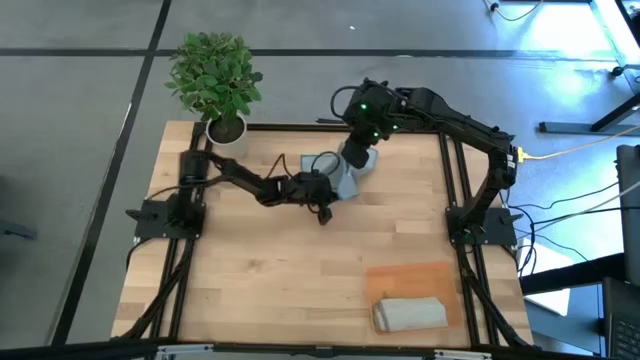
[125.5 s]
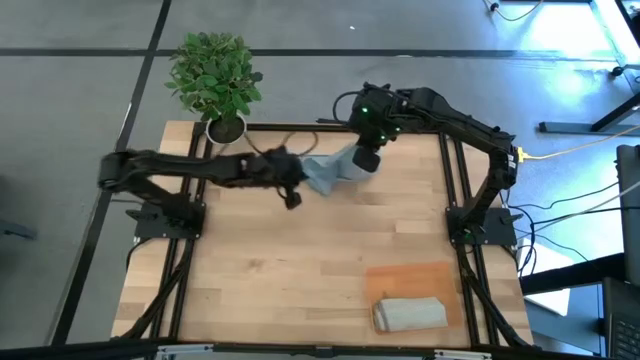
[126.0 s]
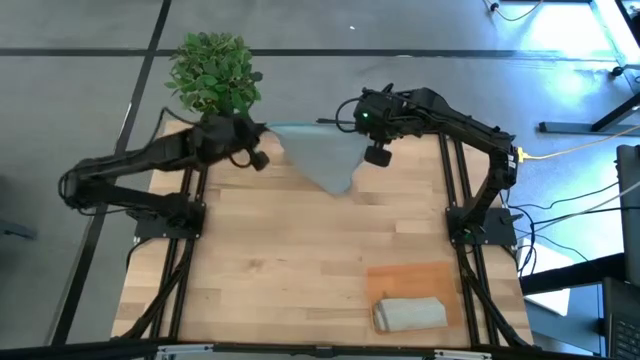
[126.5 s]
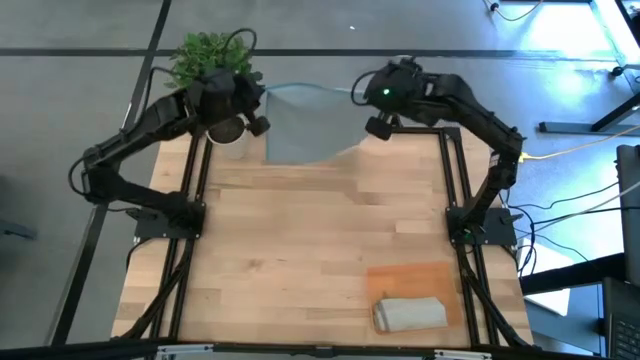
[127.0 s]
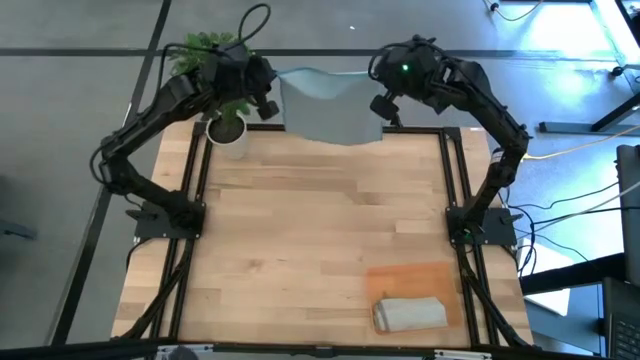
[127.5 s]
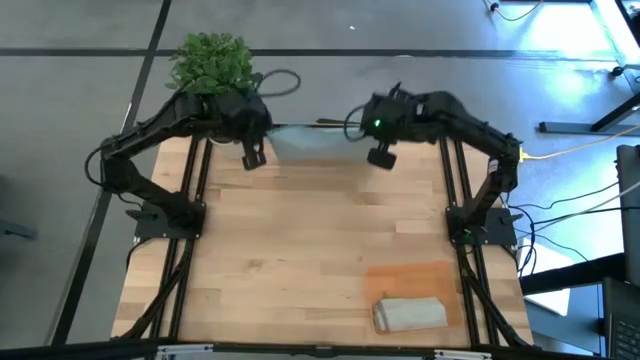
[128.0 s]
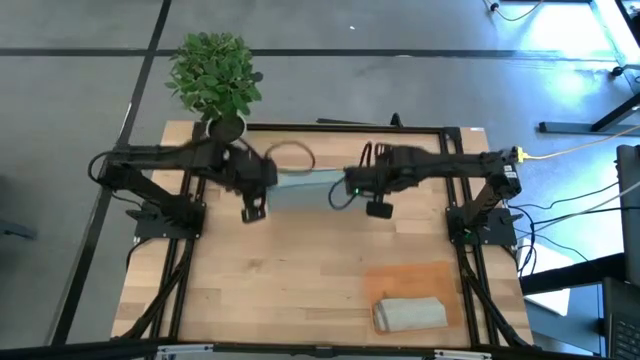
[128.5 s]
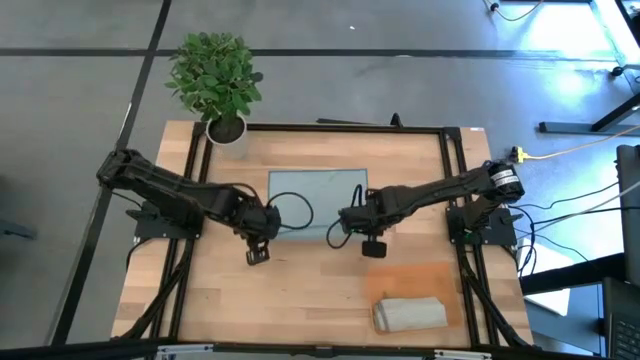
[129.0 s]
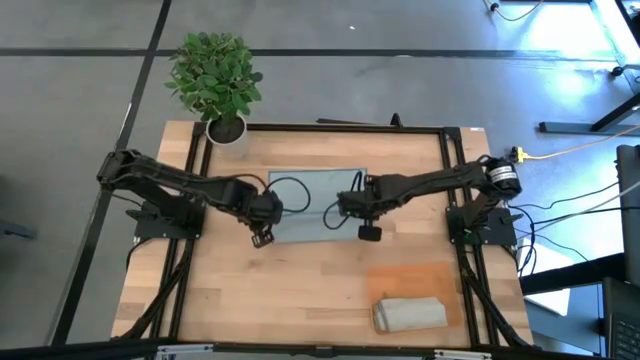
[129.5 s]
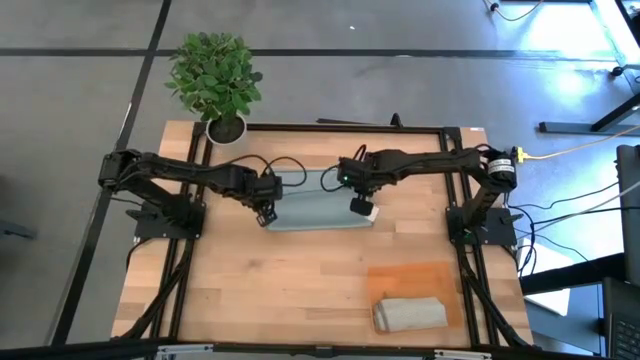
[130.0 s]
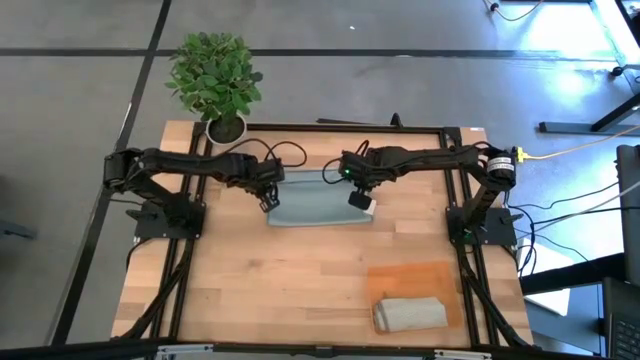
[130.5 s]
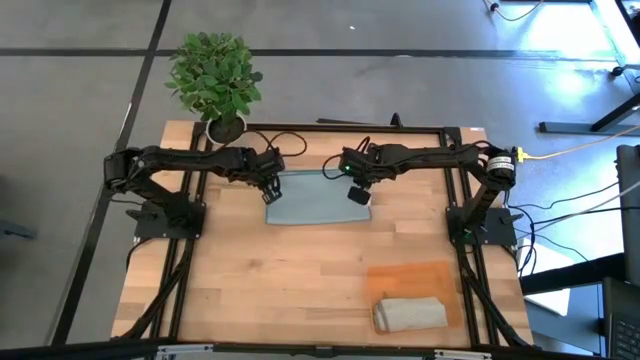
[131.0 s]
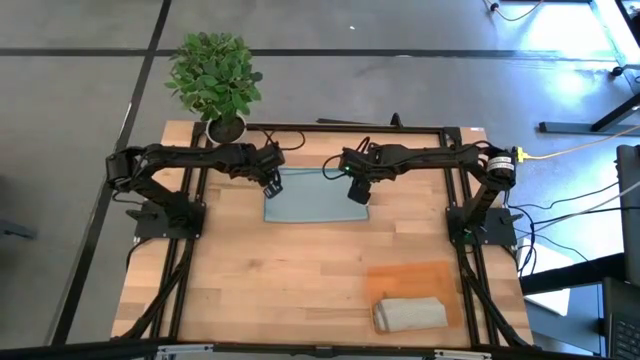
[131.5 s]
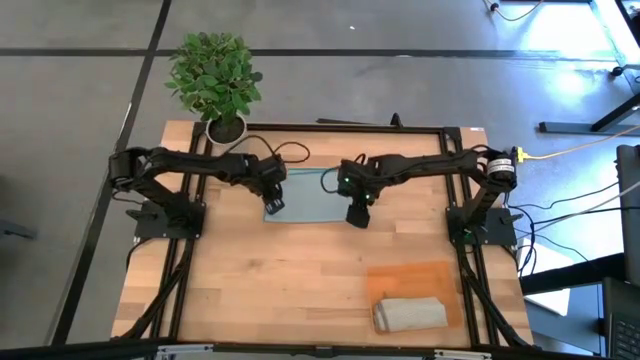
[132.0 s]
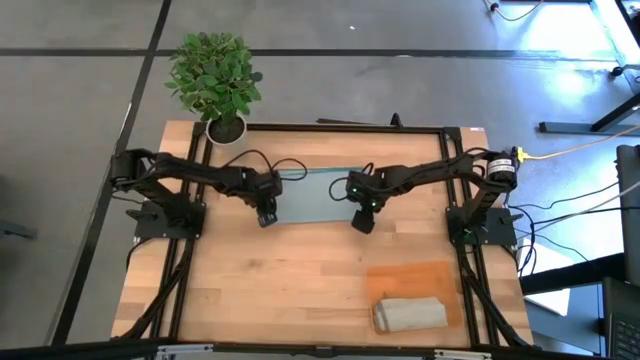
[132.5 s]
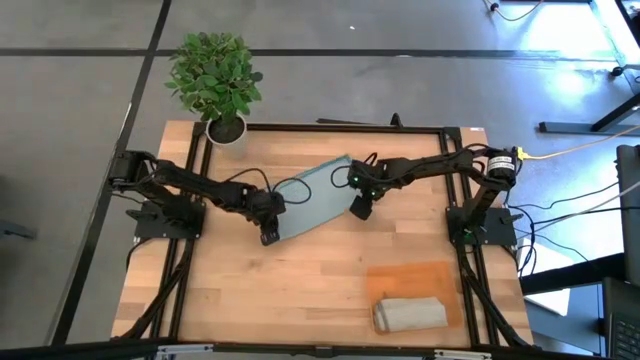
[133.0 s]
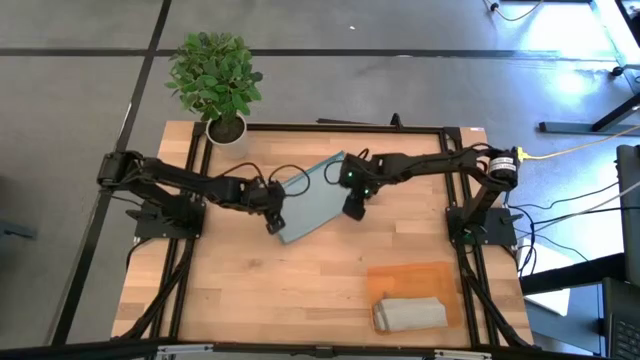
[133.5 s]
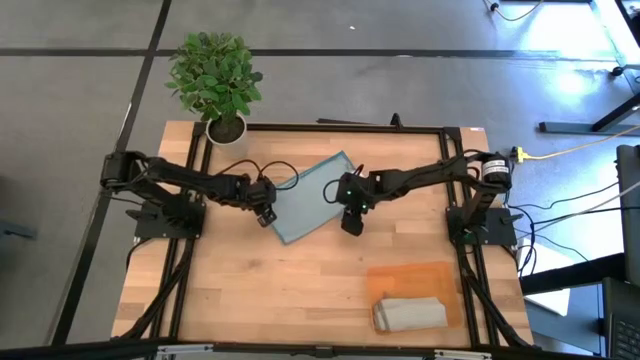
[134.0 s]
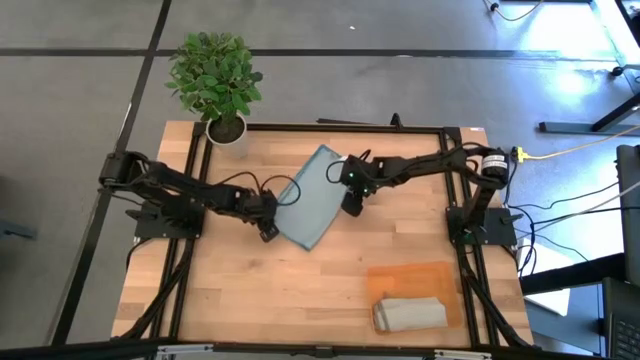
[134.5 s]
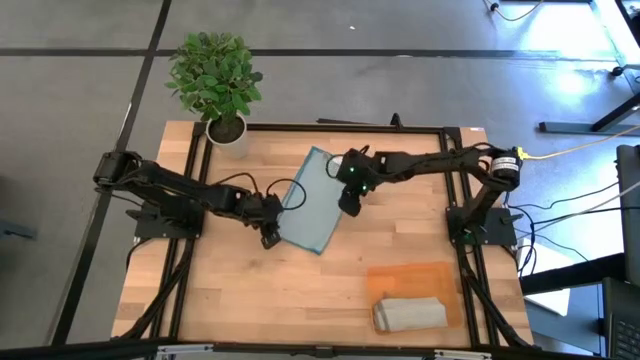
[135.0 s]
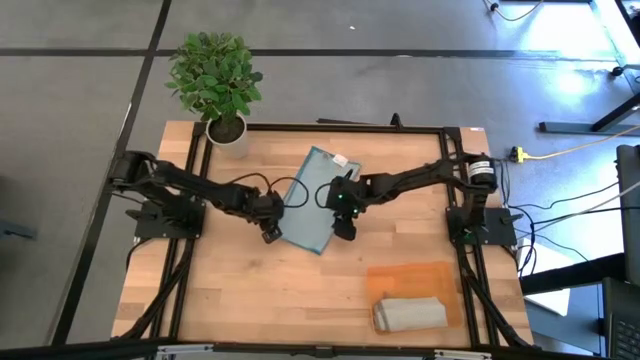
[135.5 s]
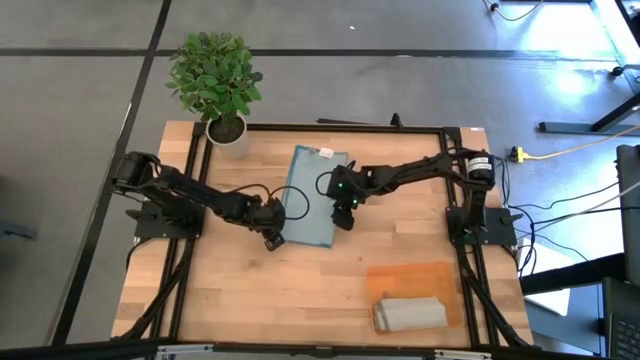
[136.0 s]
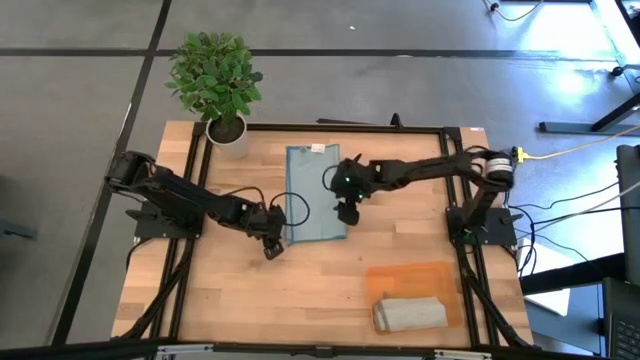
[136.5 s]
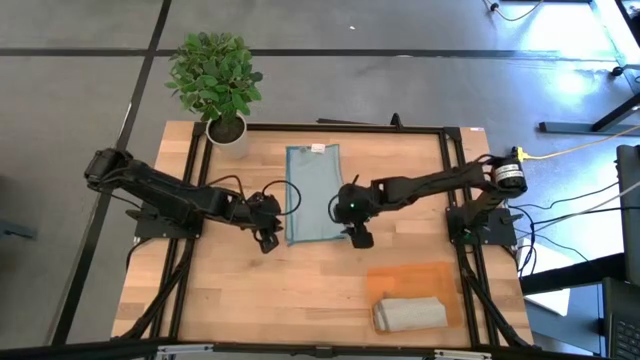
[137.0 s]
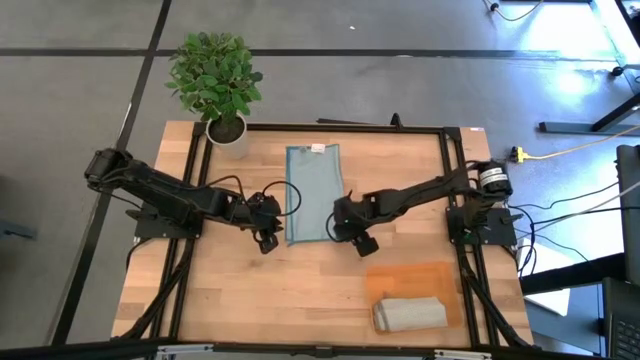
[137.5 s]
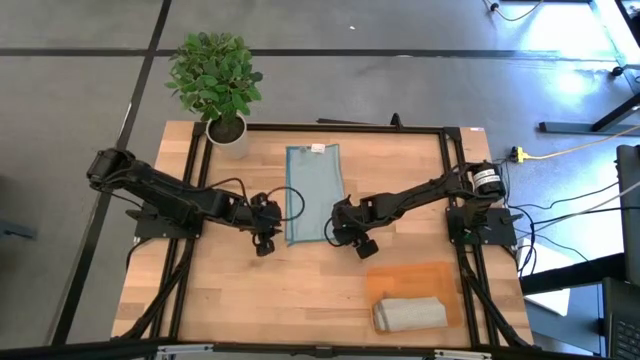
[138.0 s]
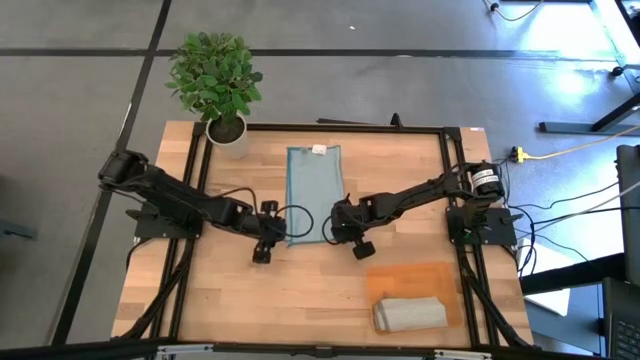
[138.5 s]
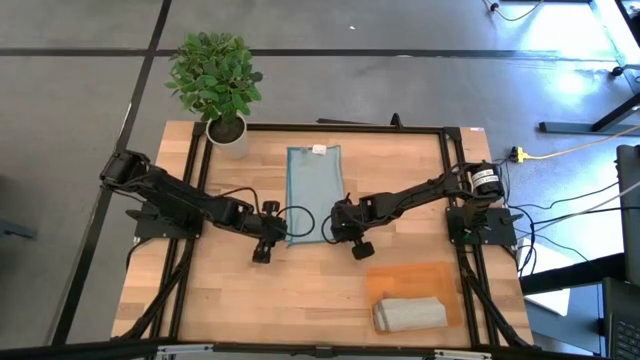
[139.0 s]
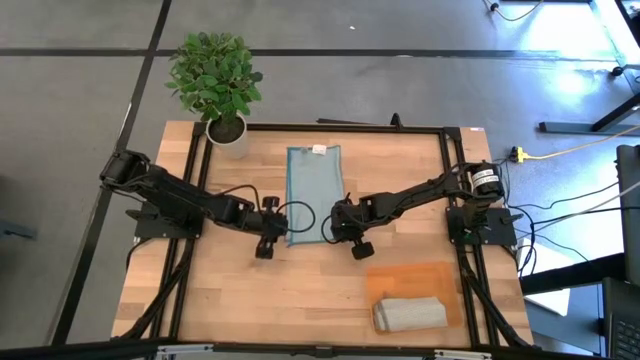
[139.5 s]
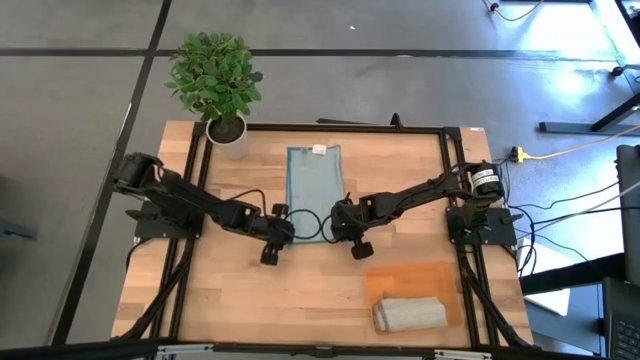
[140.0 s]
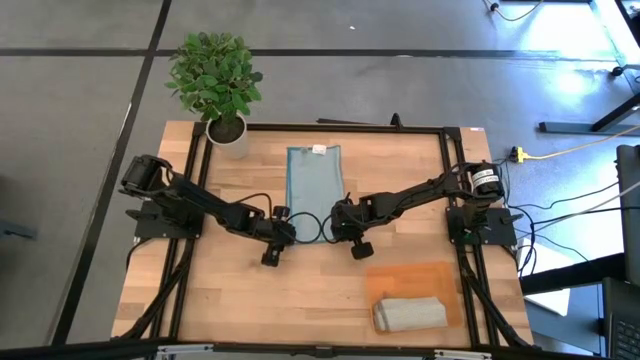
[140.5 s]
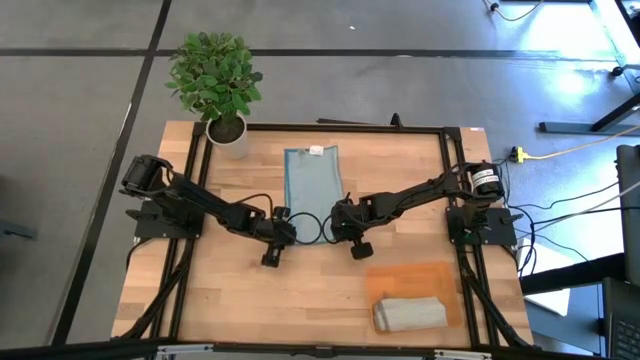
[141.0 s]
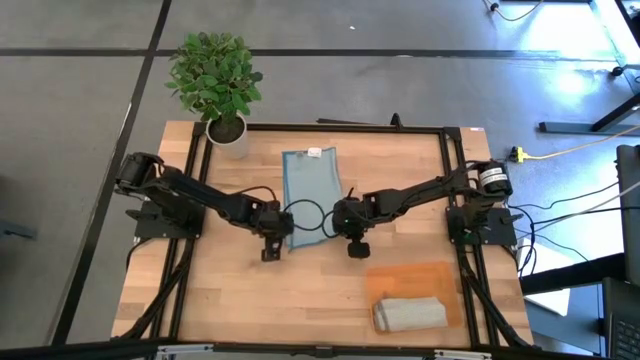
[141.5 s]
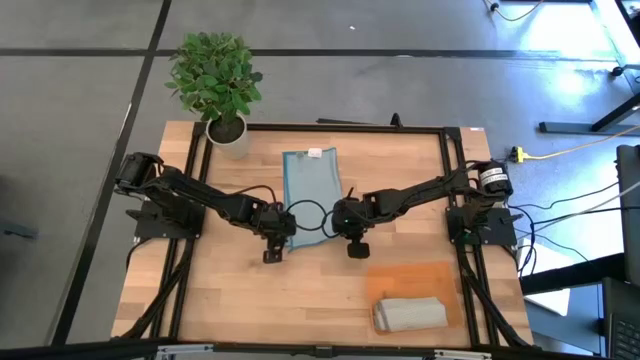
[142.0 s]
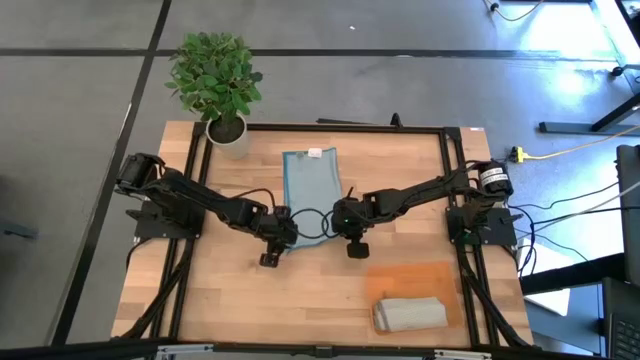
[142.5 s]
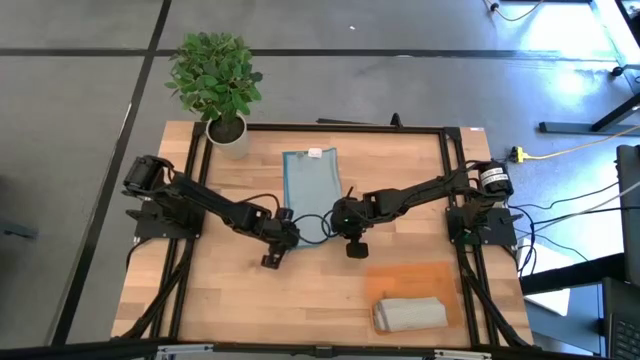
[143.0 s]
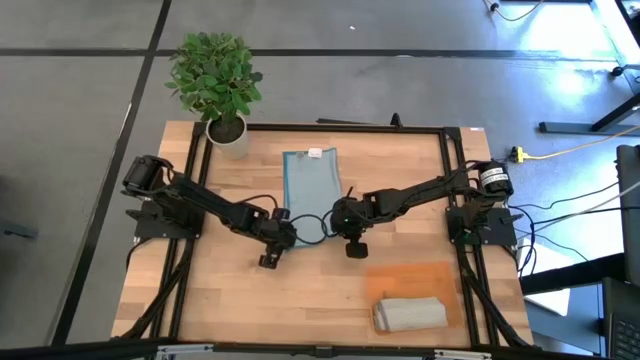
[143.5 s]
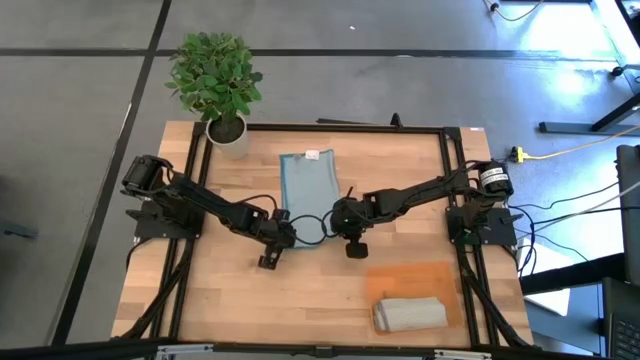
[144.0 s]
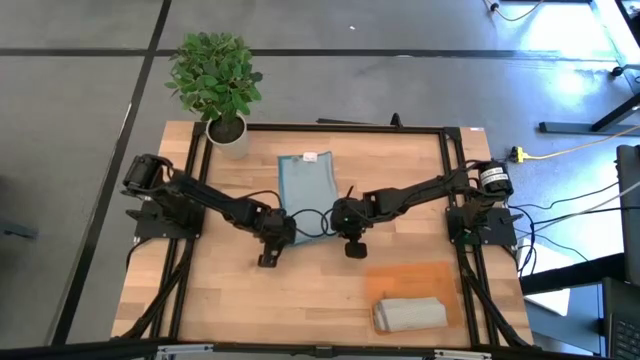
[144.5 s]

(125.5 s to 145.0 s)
Task: Roll microfiber towels into tight, uniform cylinder then place into a basket
Roll the light blue microfiber towel

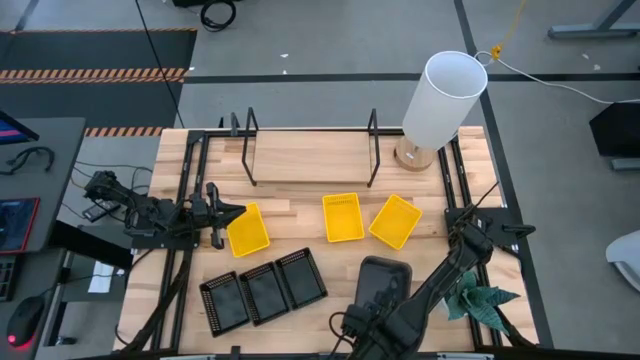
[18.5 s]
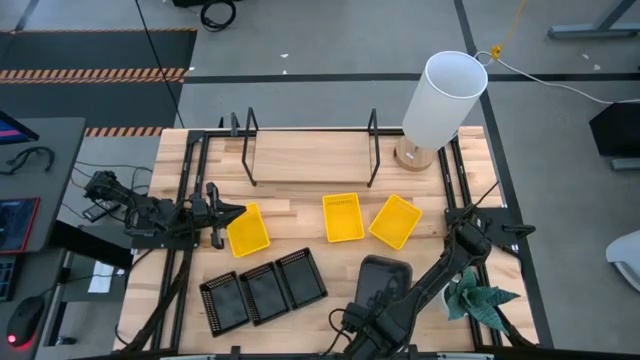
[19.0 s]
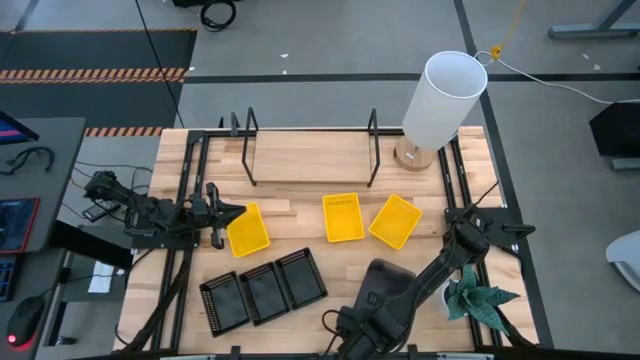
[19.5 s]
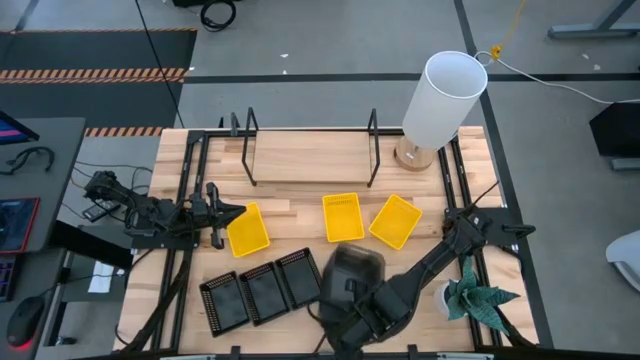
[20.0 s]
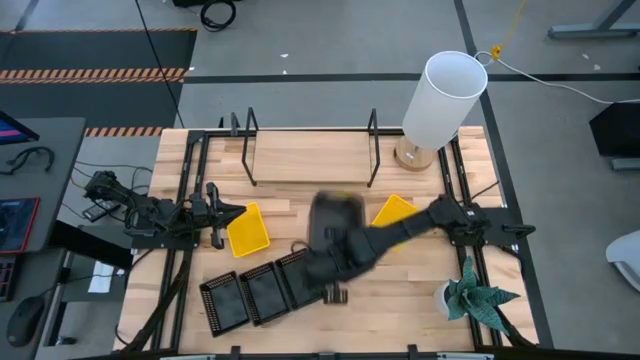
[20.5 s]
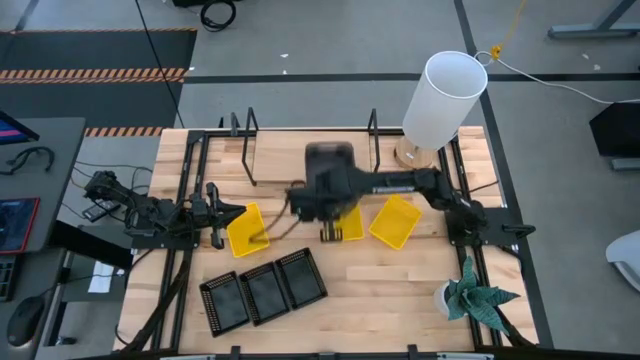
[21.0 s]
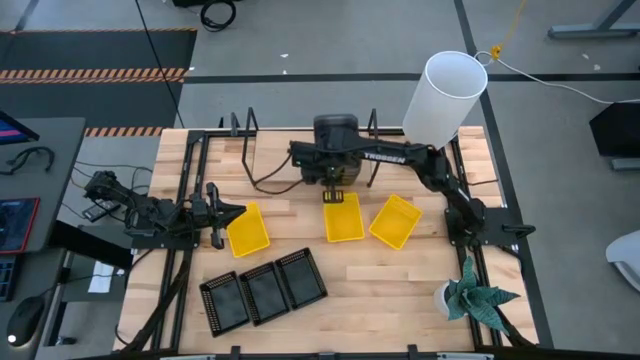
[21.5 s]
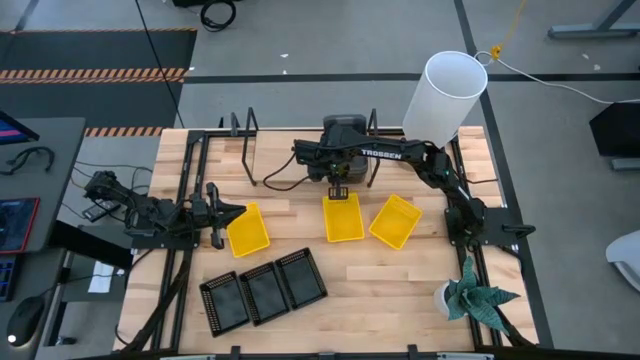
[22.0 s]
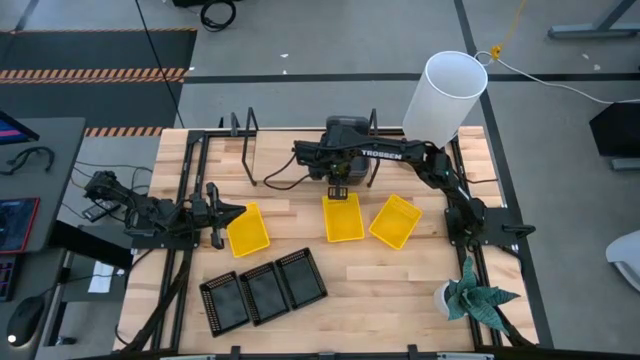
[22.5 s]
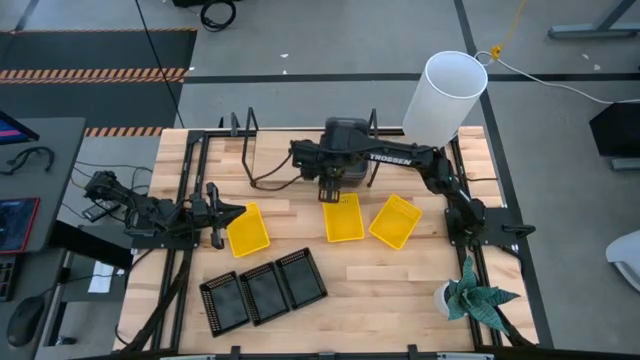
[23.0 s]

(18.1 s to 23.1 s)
Task: Stack baskets on shelf by color
Put the stacked black bins on the shelf
